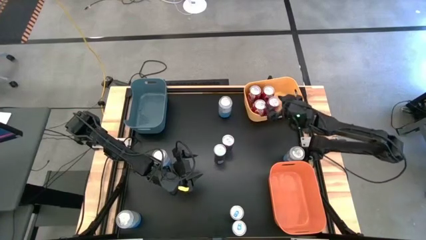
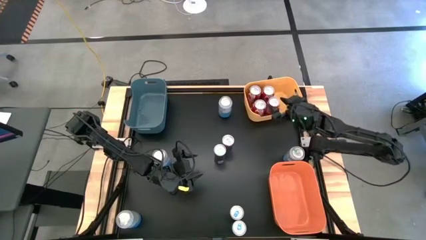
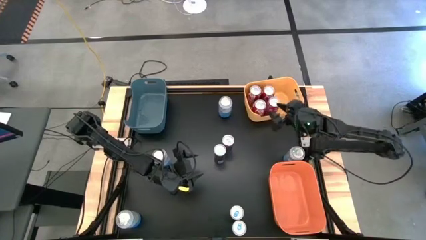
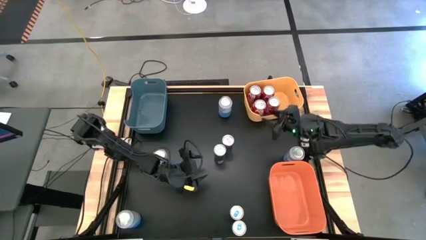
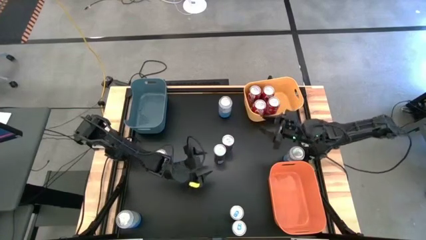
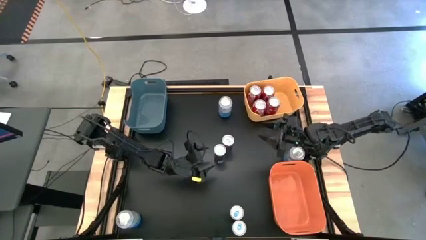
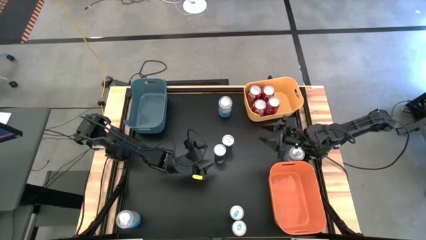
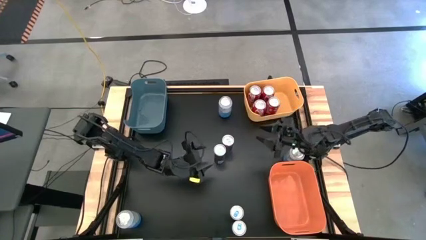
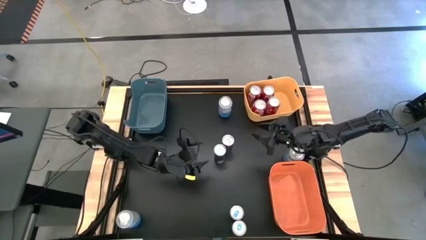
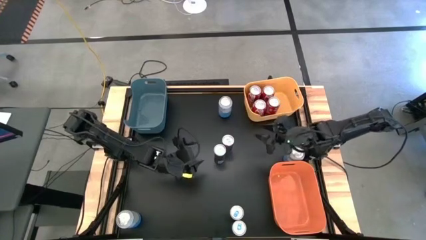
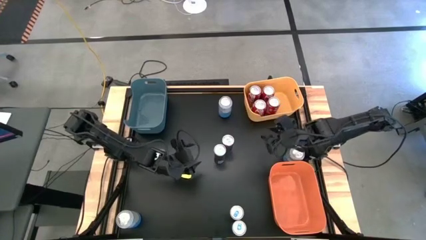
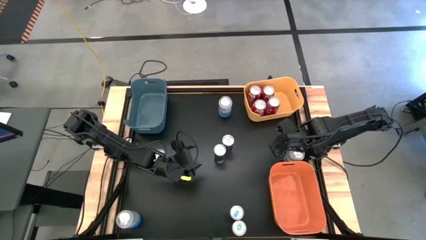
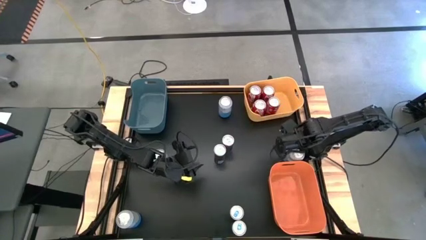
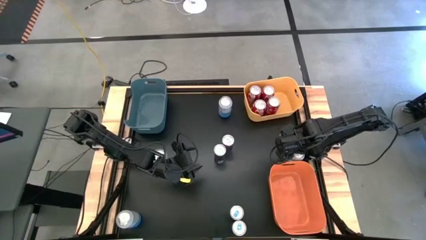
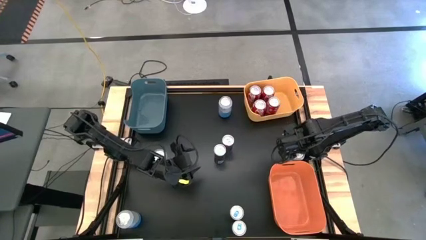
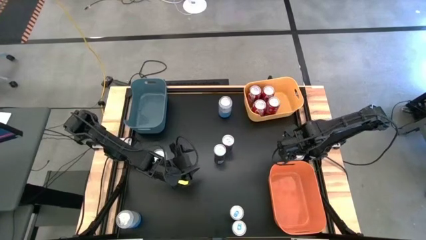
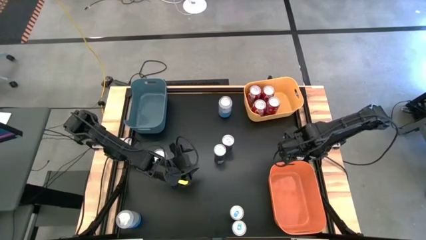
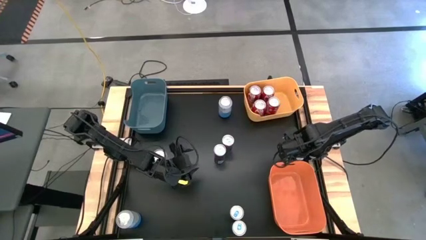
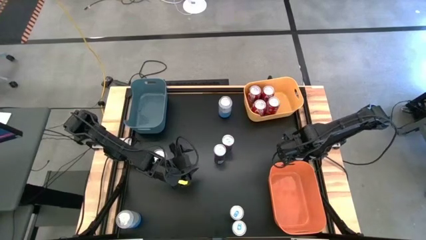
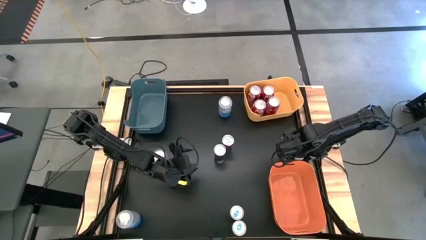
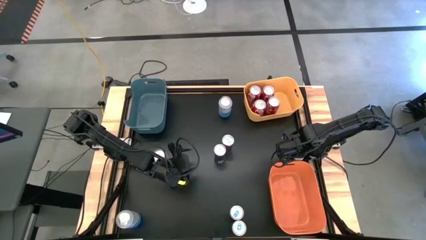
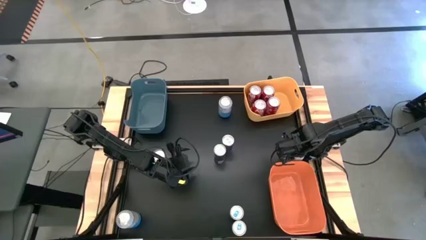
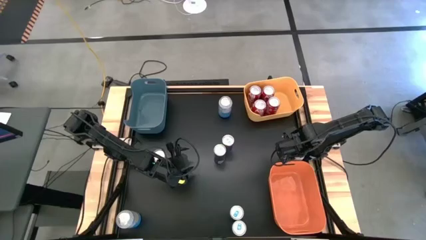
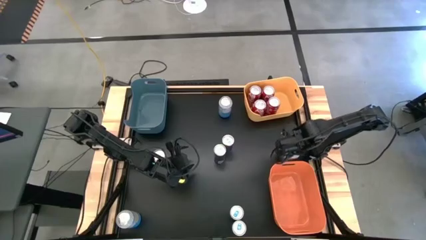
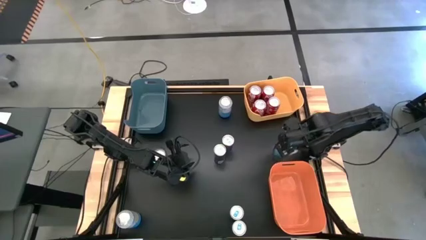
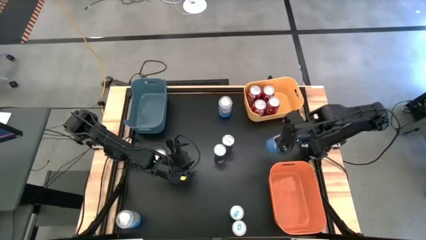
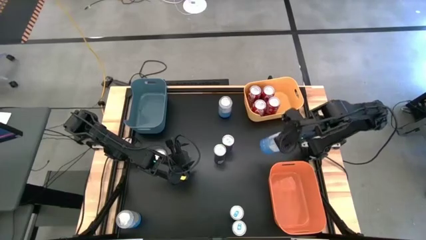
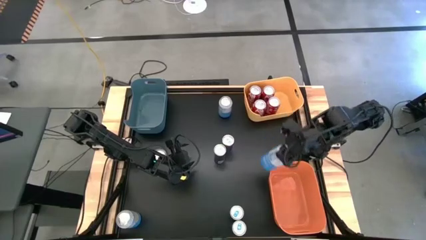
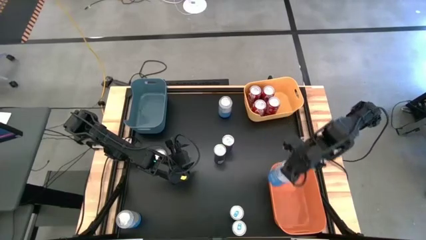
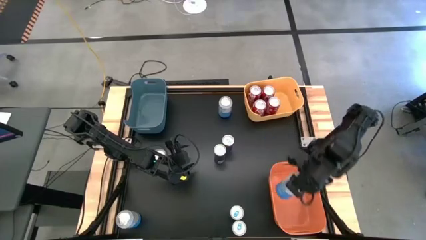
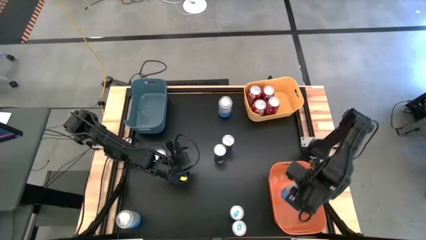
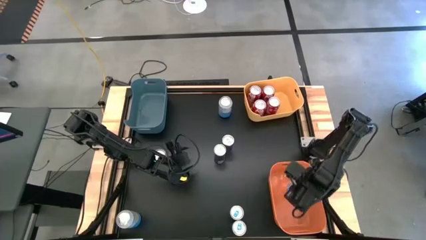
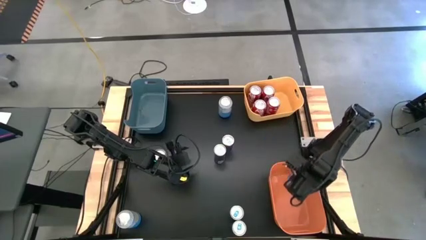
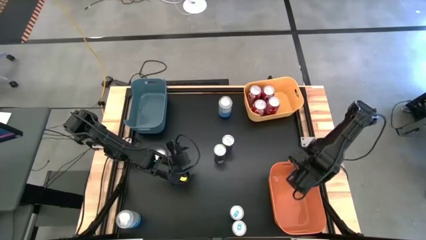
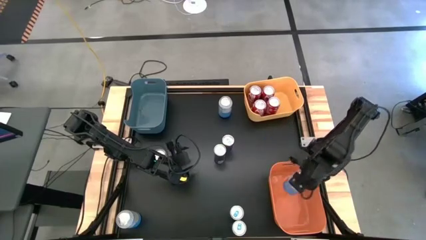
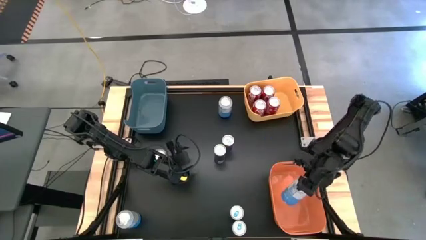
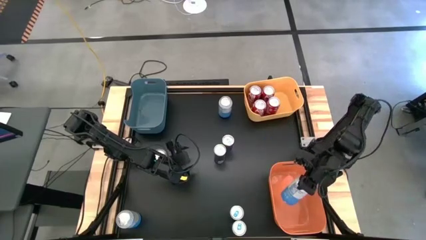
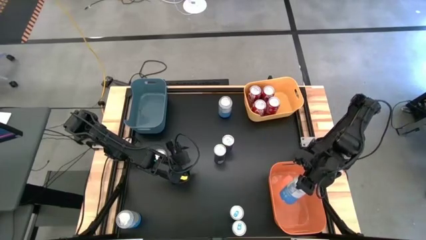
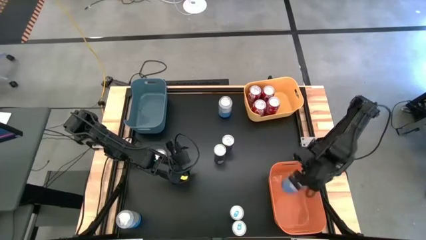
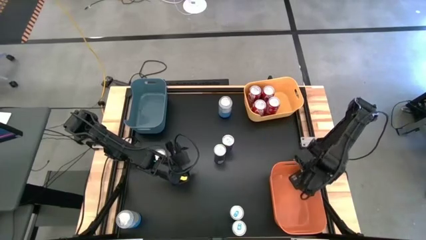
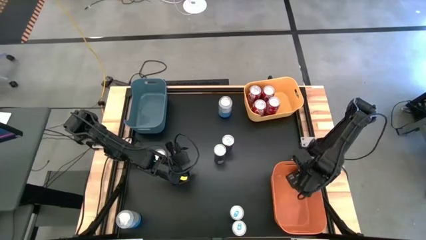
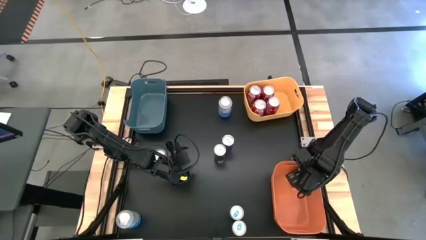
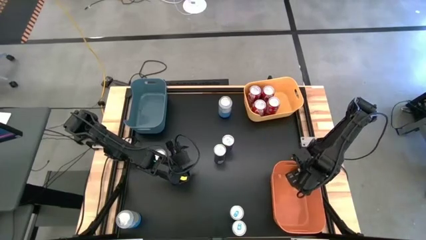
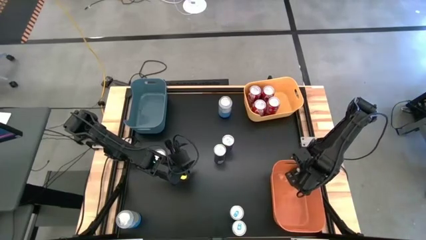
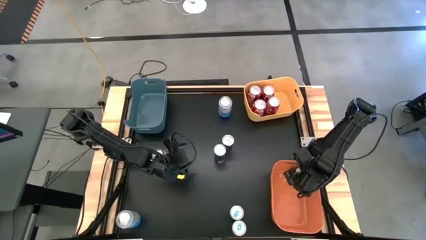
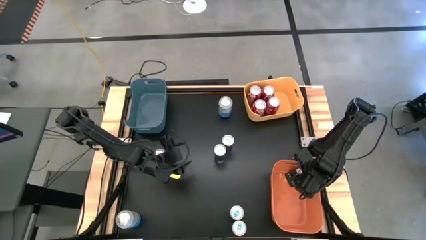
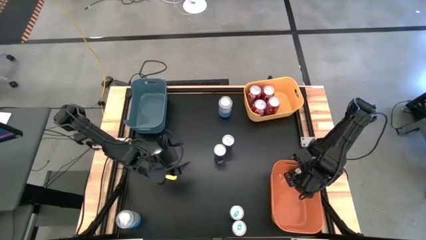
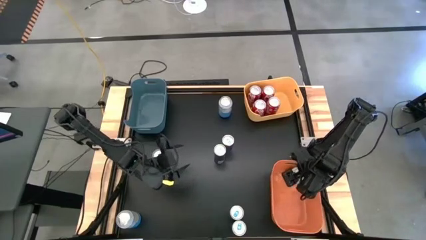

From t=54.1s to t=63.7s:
Task: Sort soda cans
Put the middle right white soda can into the orange bin

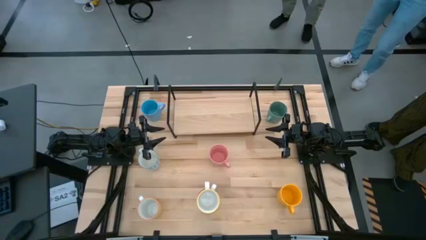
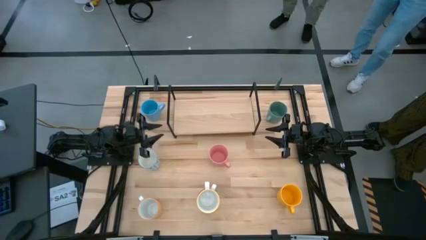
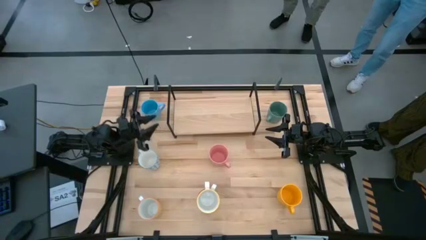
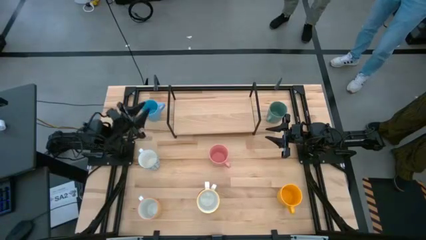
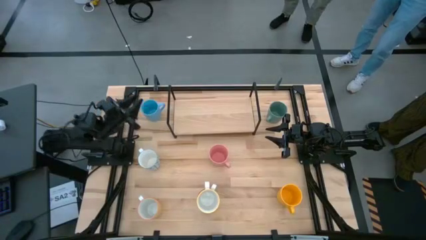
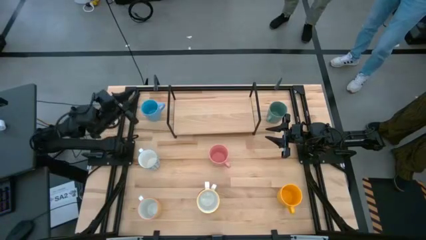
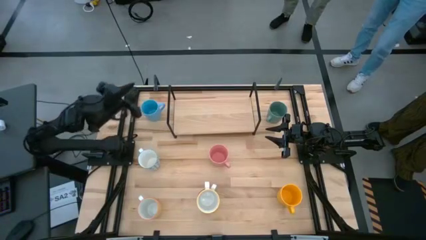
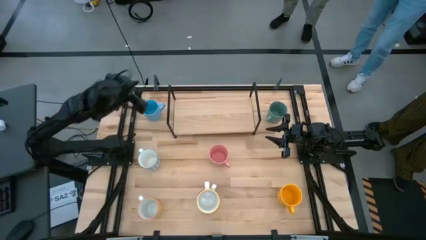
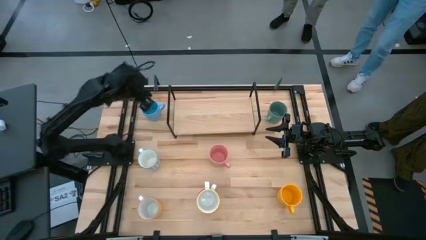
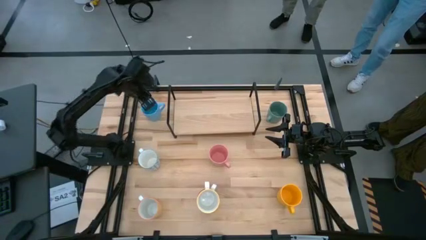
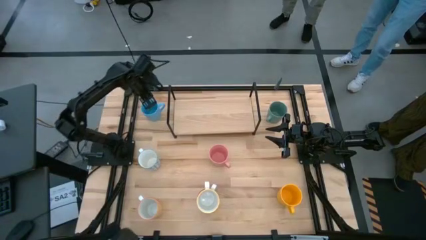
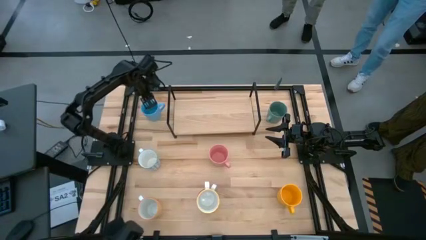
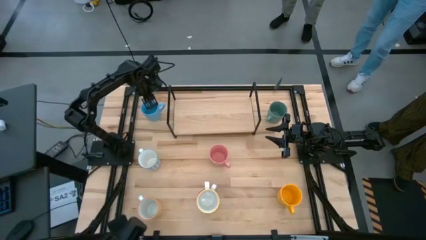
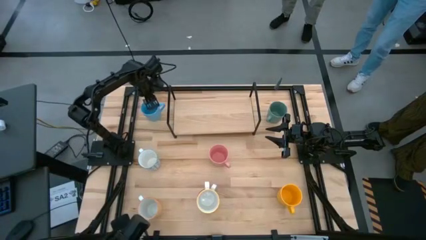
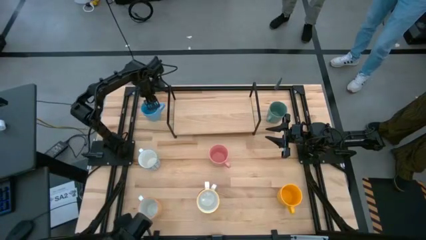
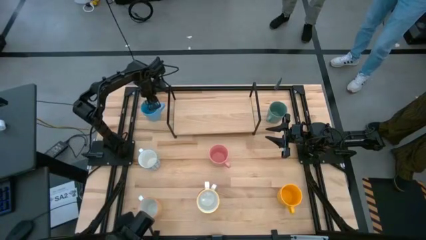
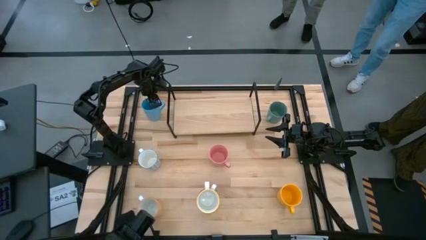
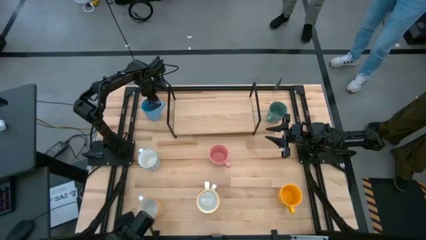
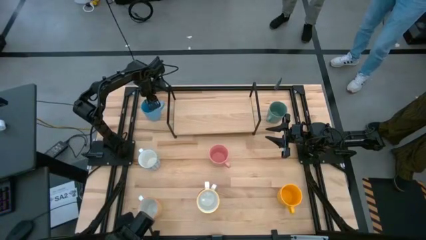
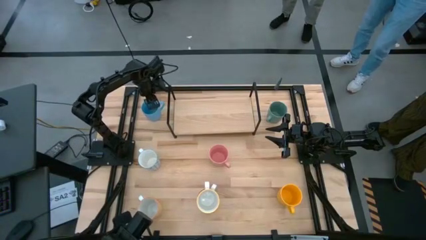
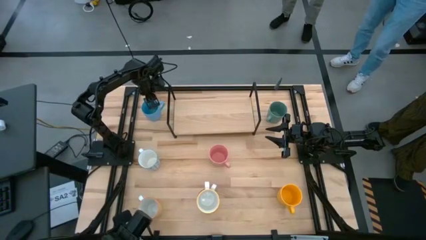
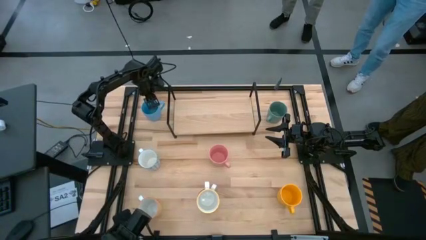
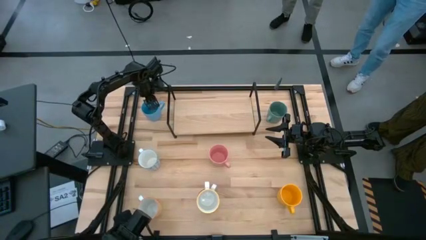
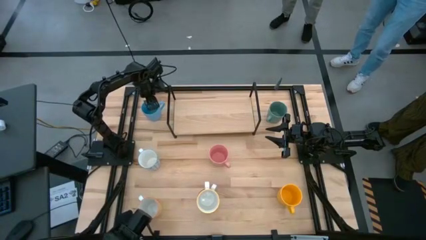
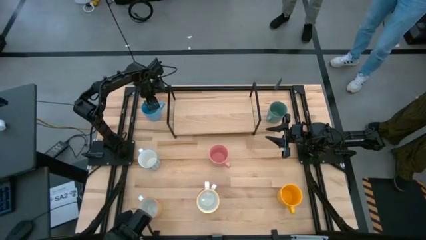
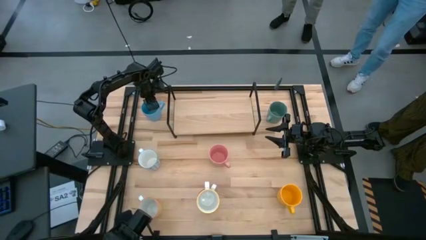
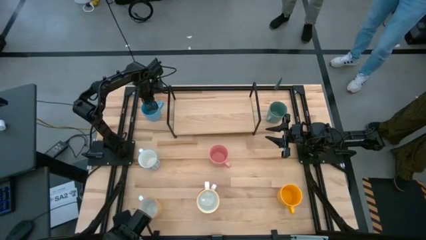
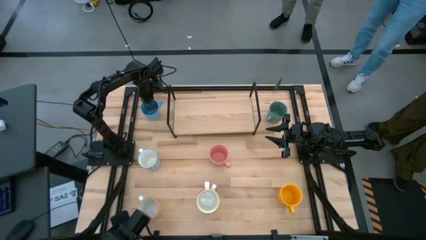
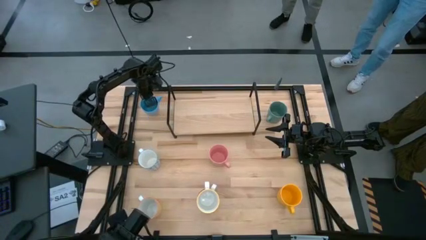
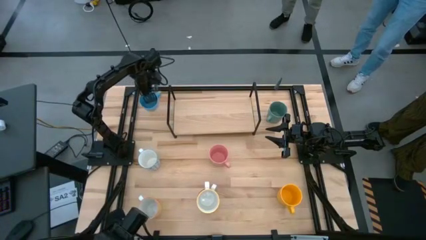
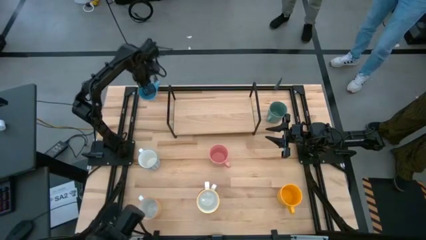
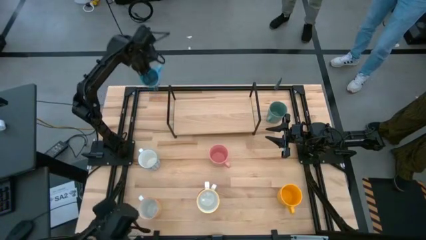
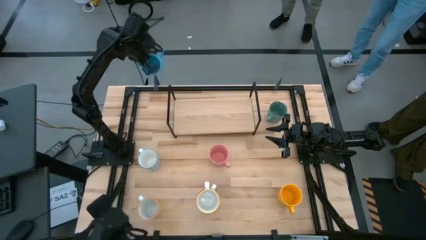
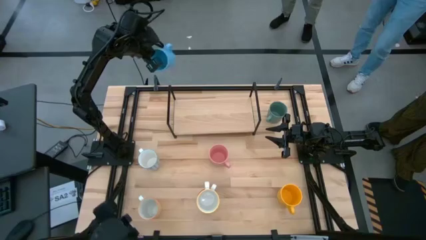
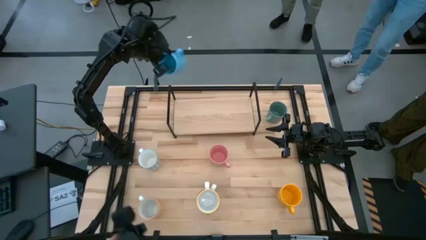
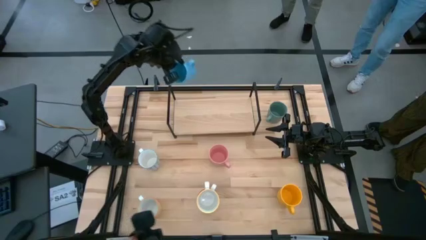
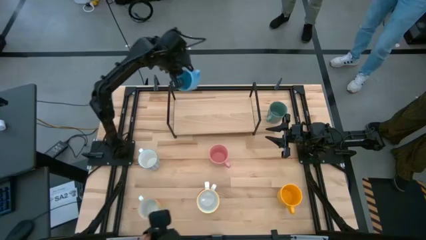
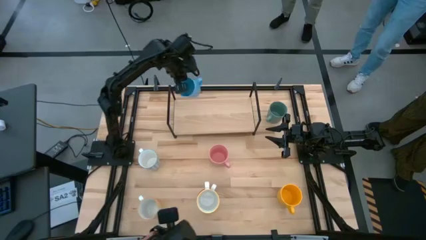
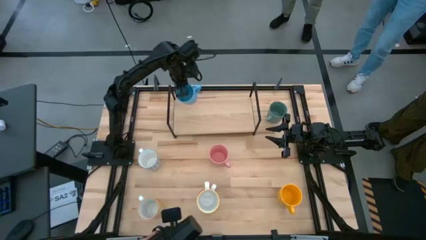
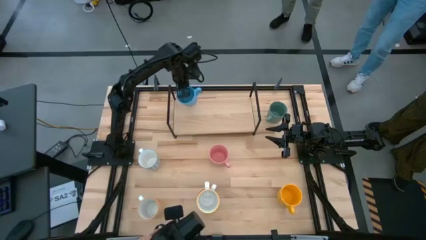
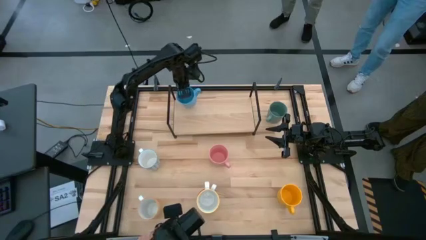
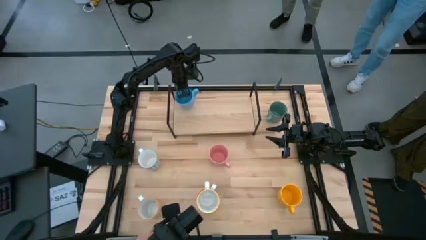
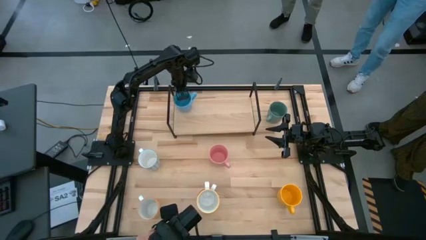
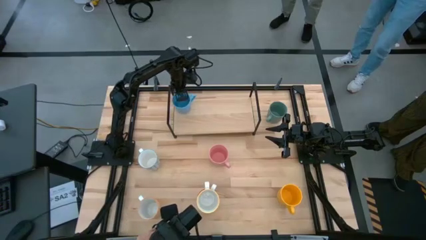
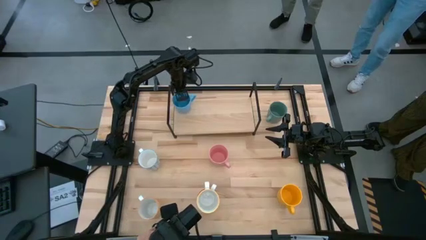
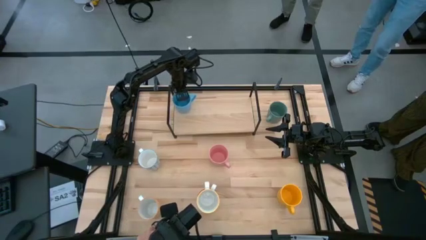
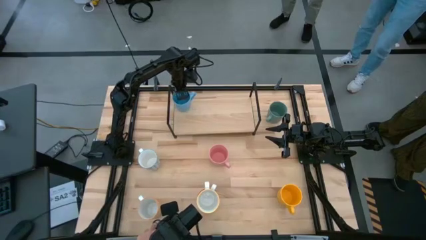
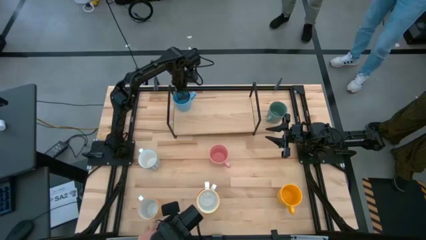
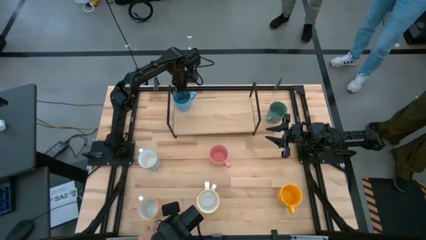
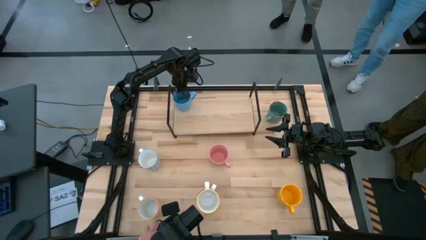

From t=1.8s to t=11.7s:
Task: Place coffee mugs
Put the blue mug on the the shelf
